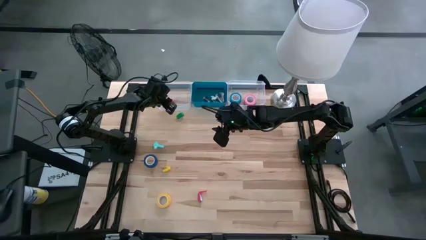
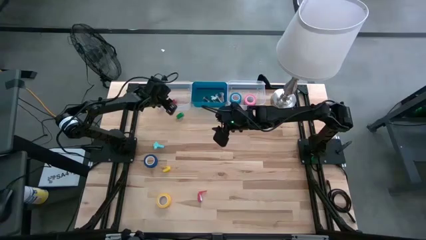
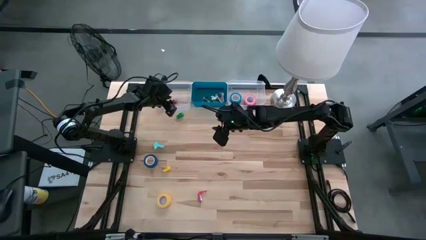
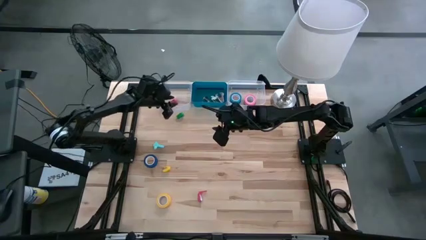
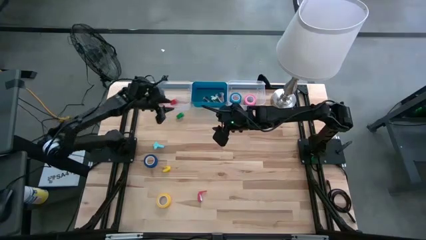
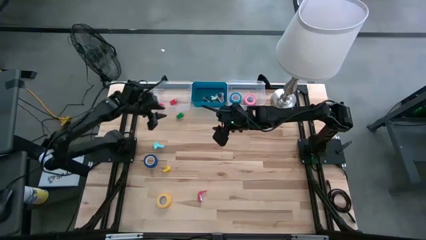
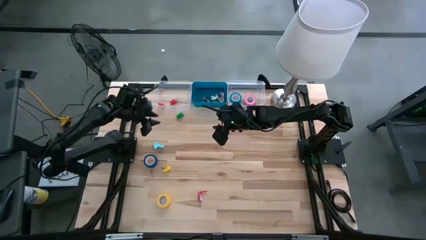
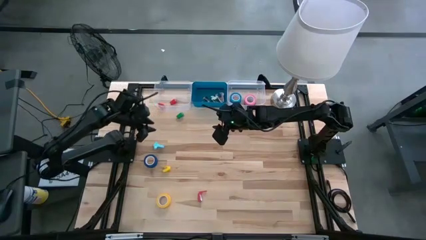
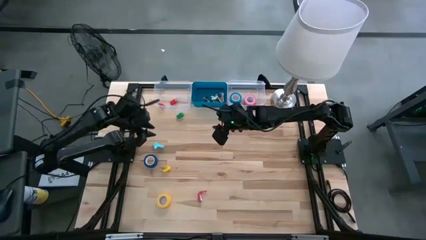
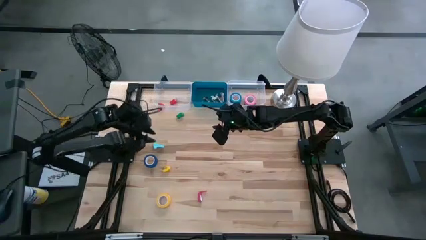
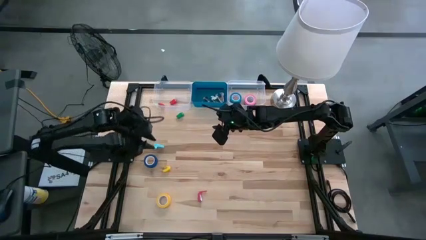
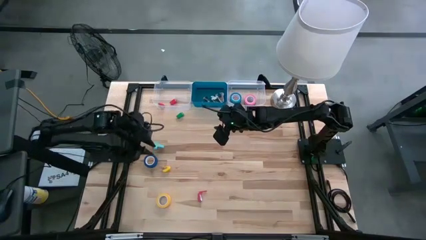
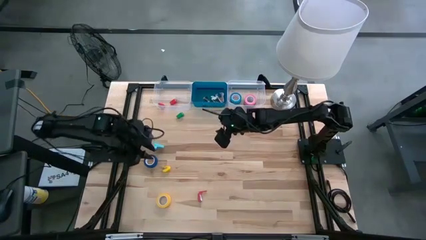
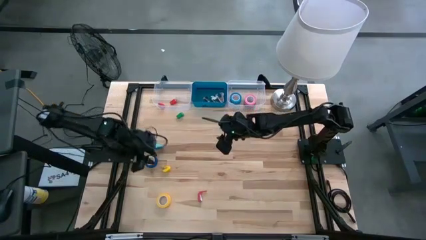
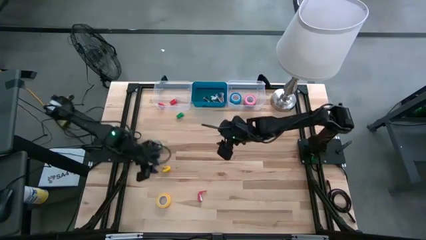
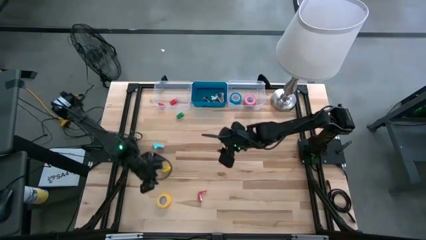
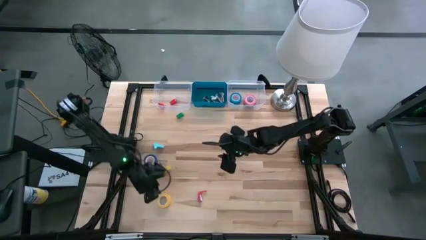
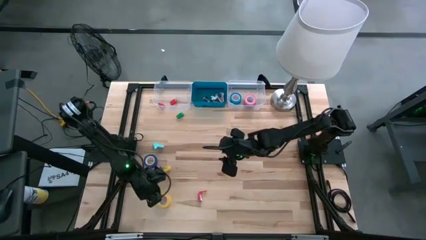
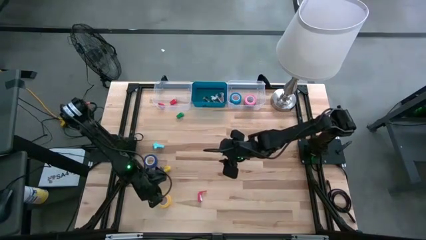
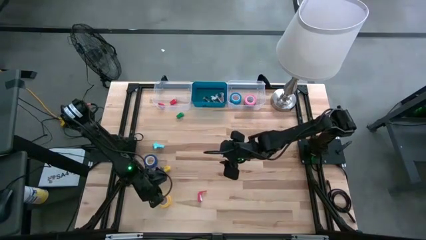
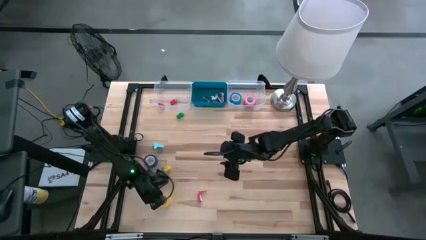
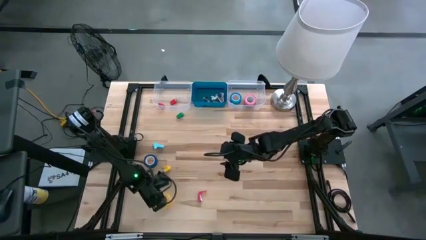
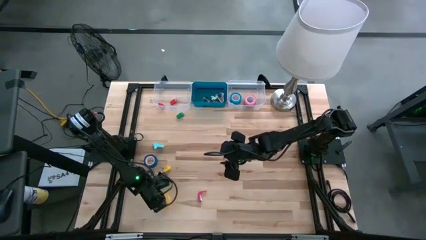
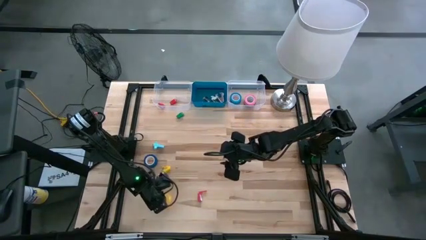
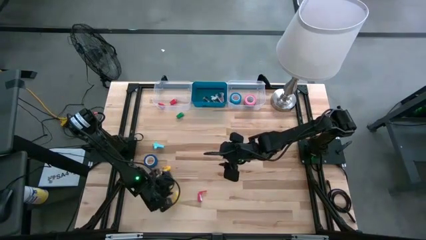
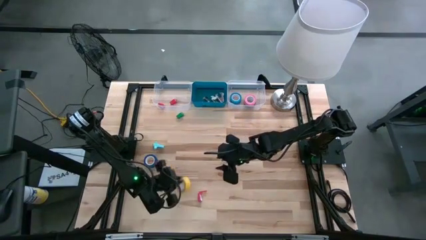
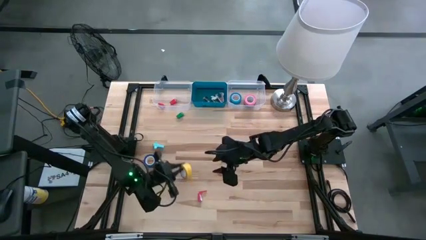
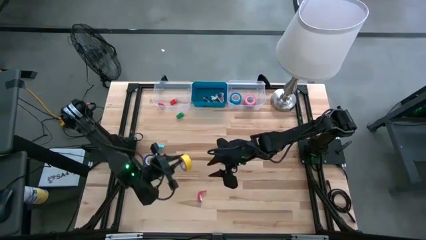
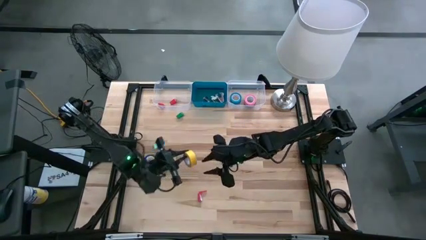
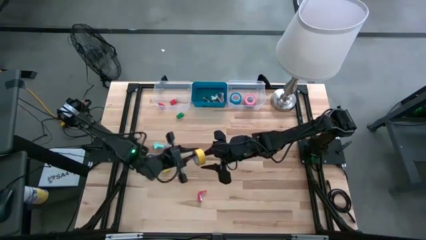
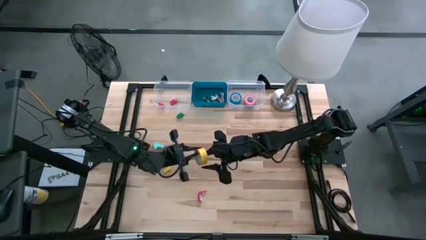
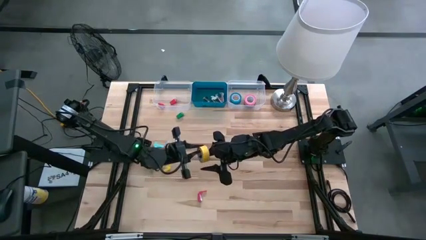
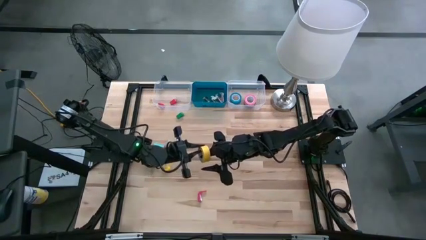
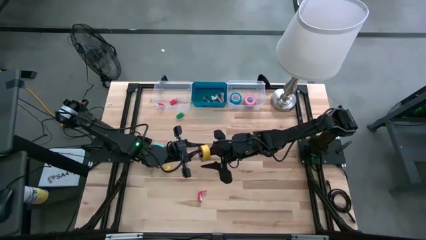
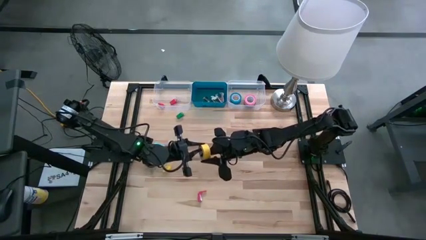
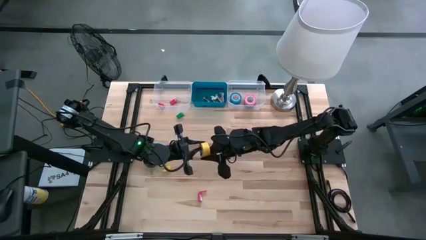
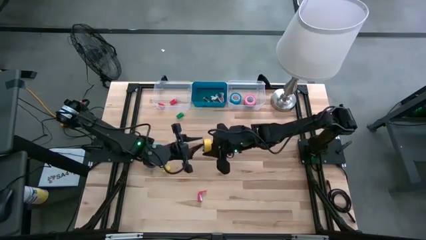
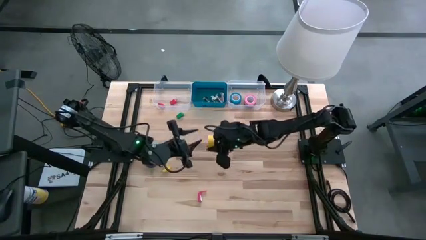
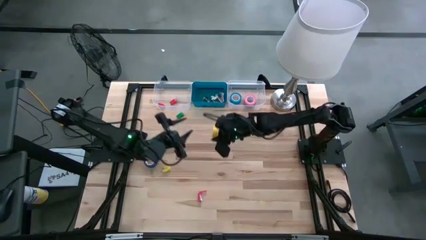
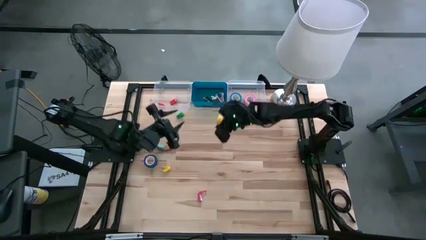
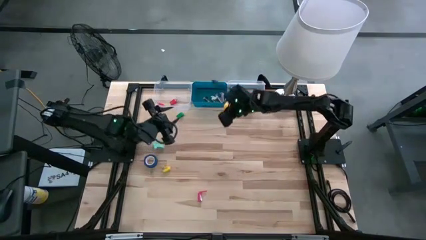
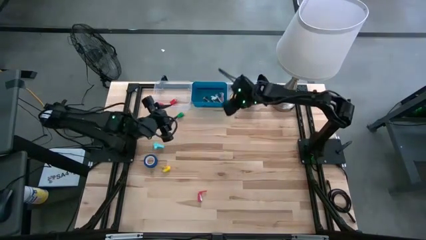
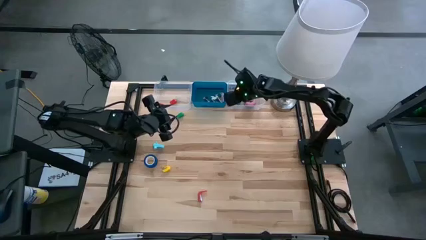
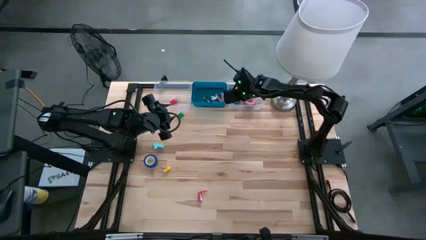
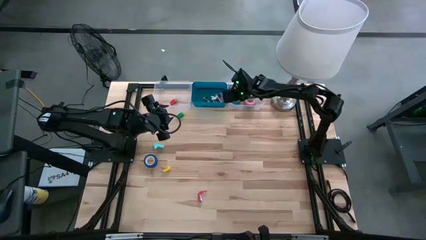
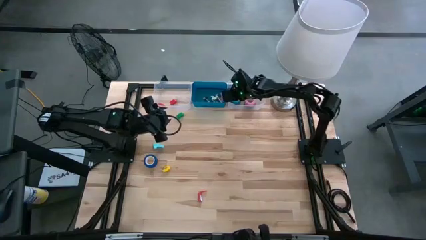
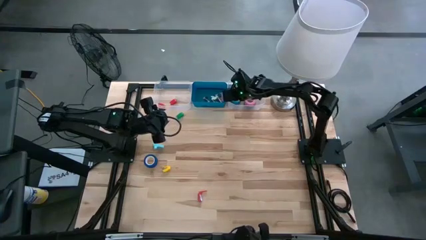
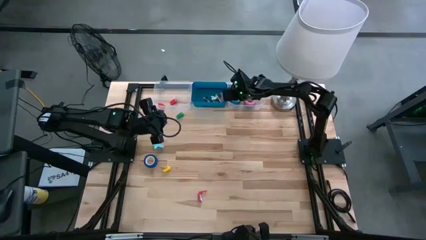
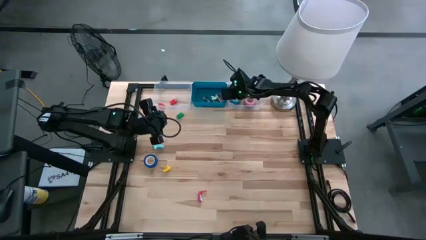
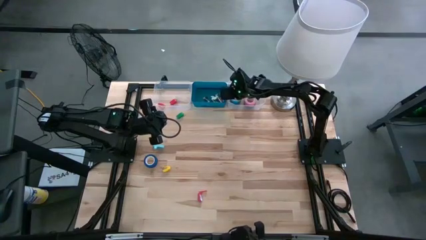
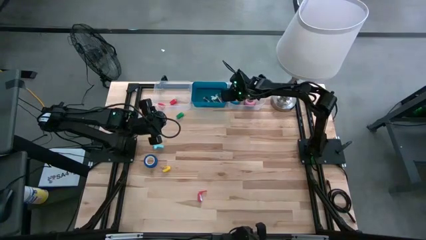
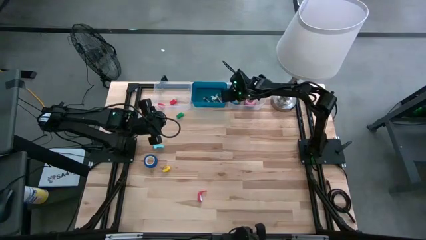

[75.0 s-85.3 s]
Task: Pick and place Stapler, Stapler remover, tape
Put the yellow tape into the right transparent bin

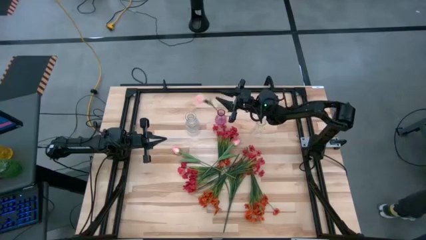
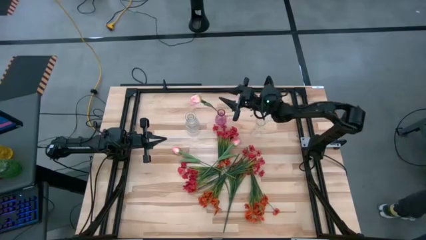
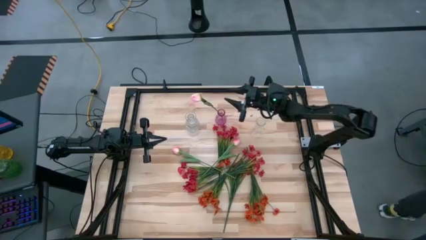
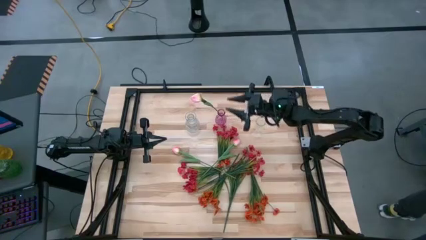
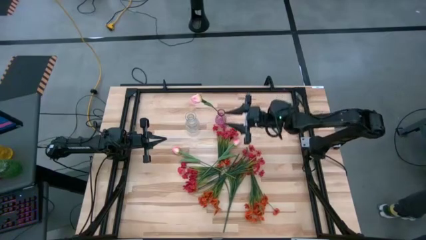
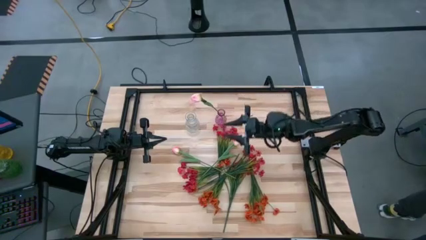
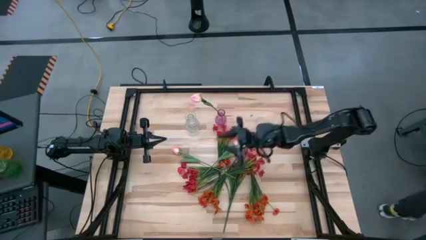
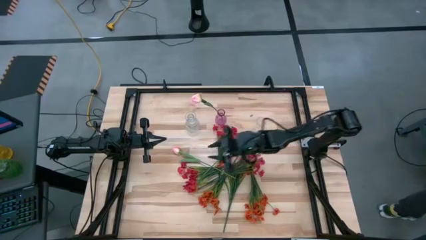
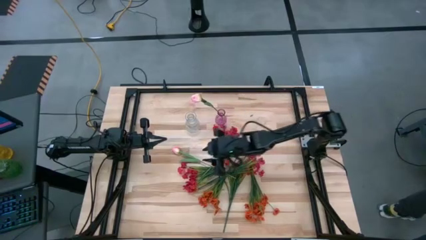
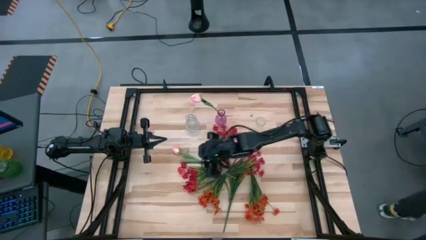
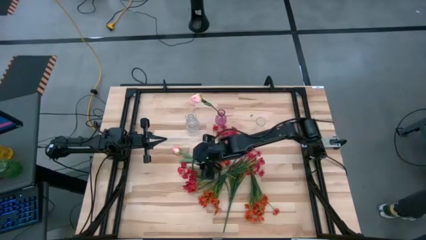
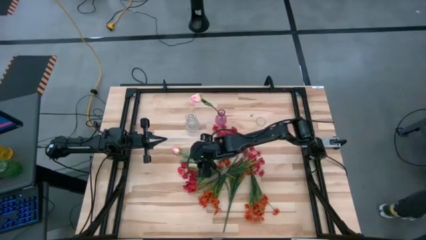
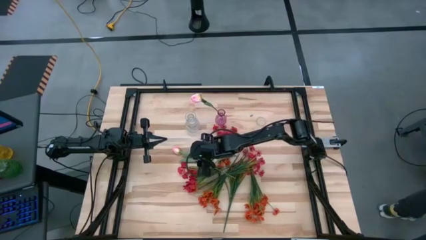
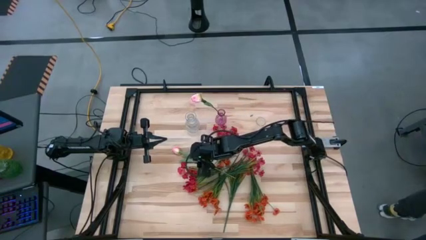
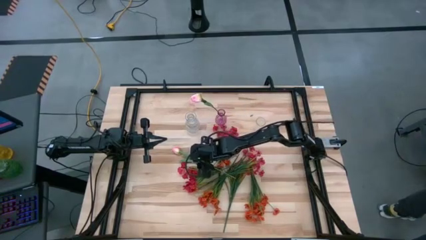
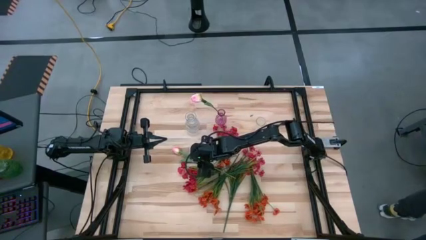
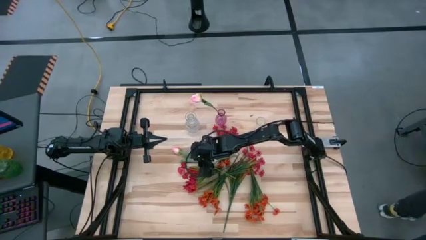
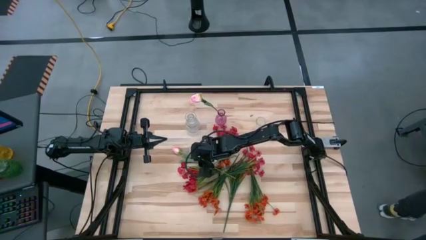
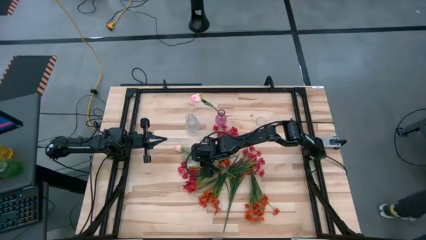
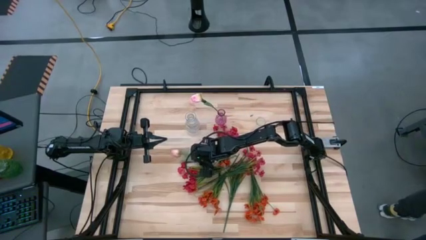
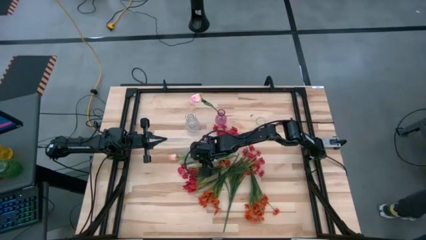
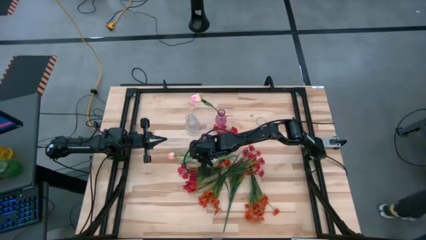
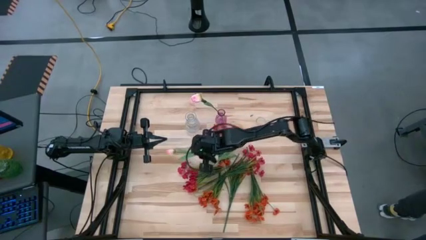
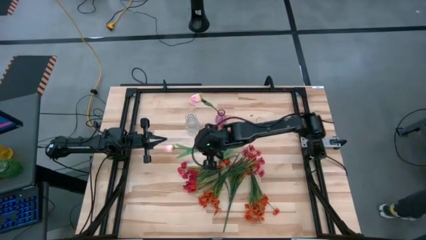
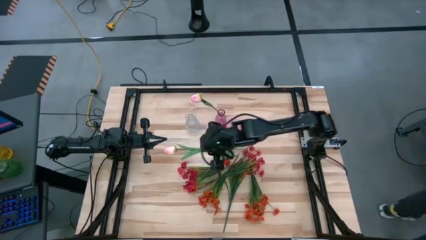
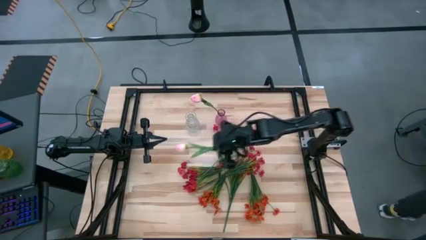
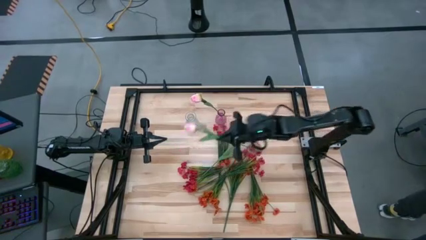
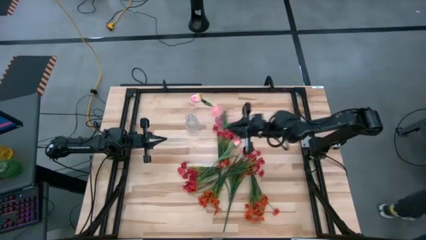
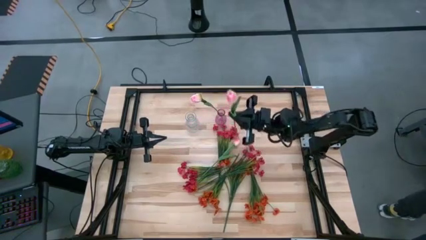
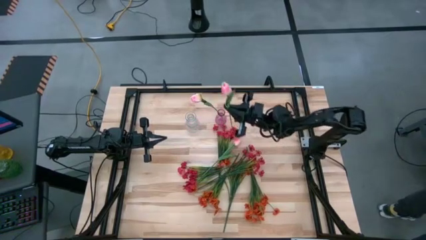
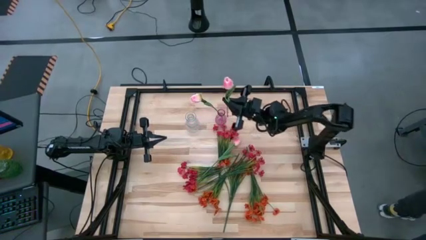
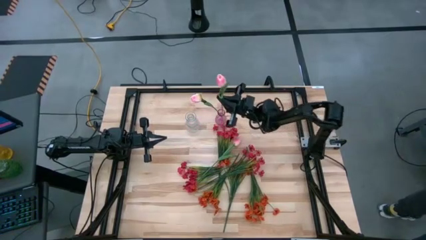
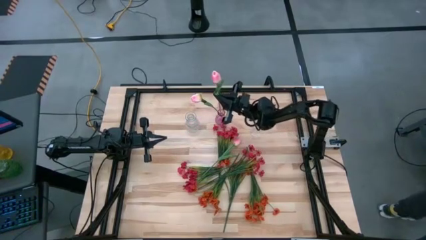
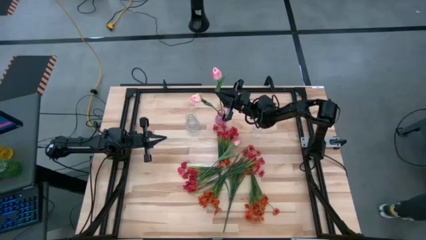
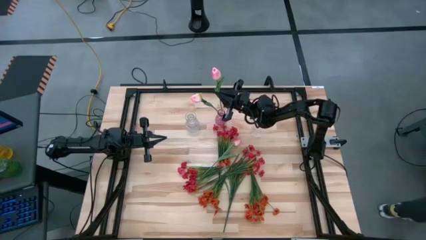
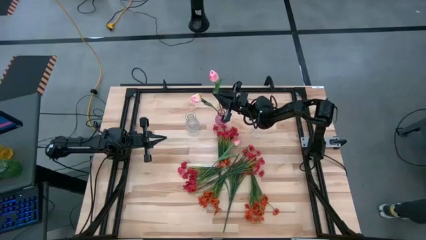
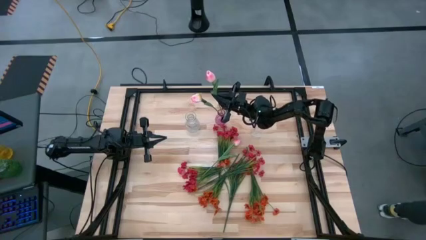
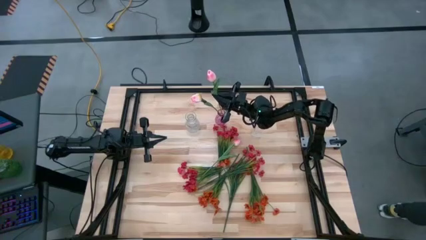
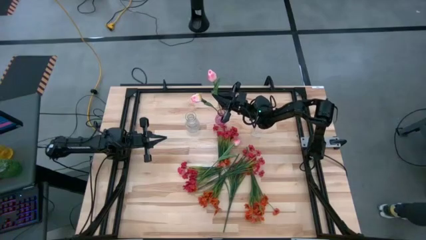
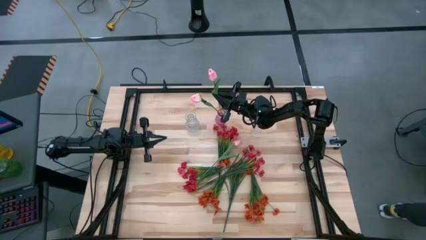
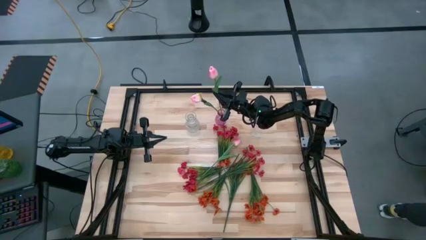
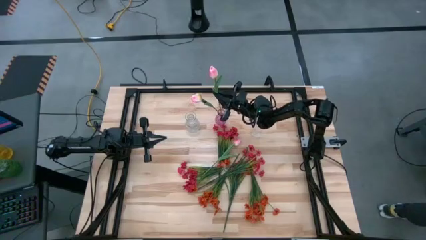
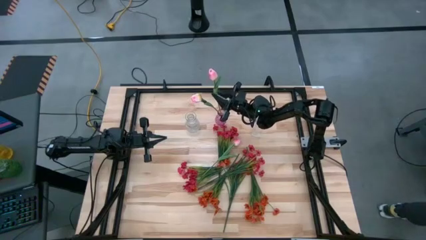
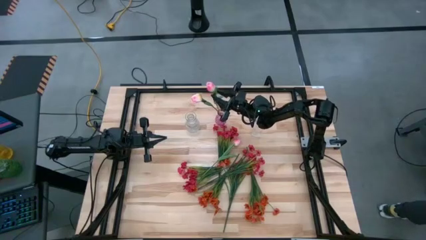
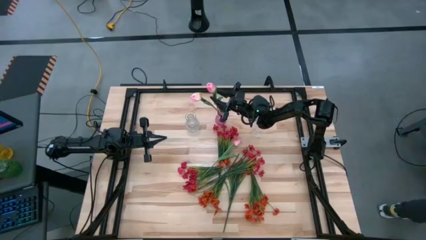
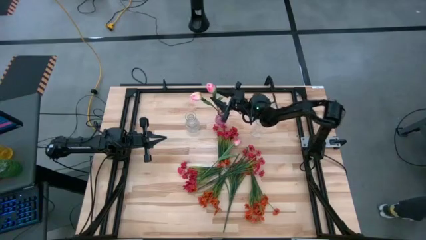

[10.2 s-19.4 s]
Task: Sort flowers into vase by color
Put the left pink flower into the purple vase
